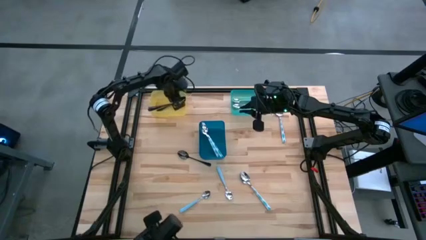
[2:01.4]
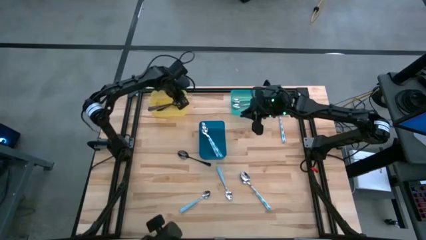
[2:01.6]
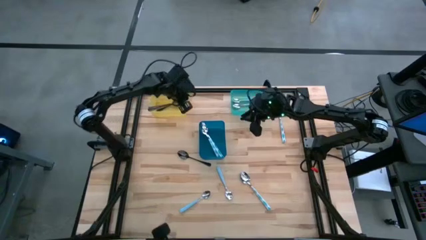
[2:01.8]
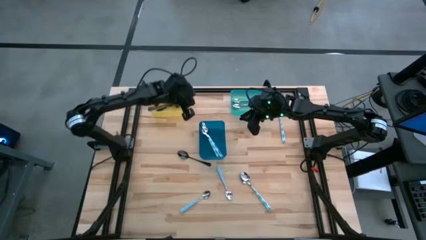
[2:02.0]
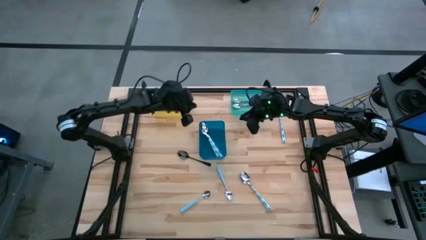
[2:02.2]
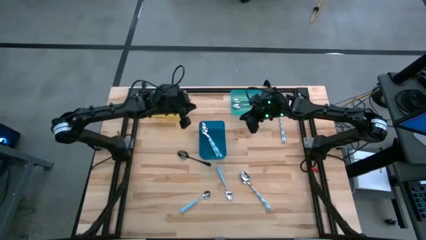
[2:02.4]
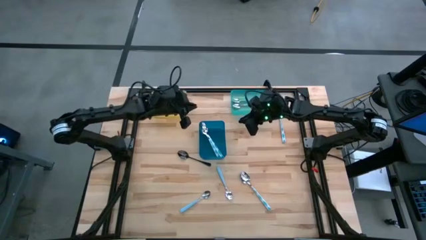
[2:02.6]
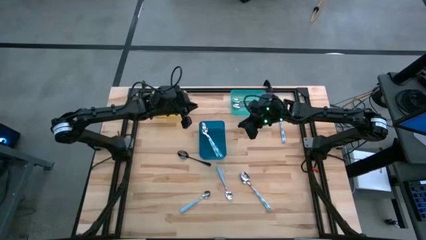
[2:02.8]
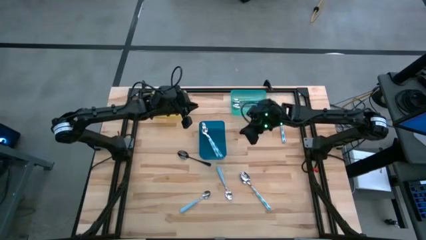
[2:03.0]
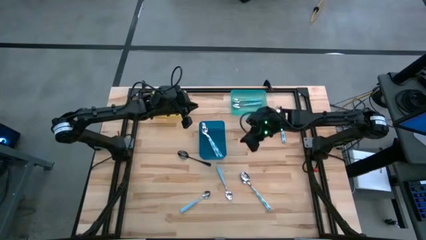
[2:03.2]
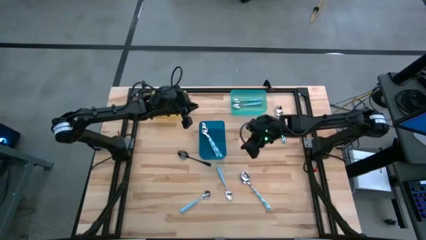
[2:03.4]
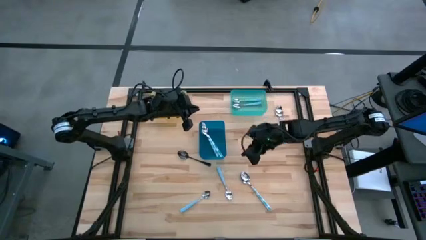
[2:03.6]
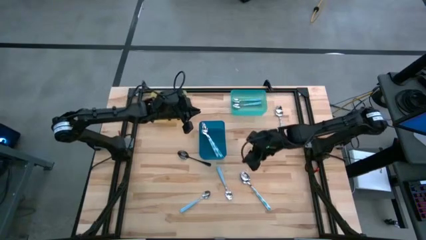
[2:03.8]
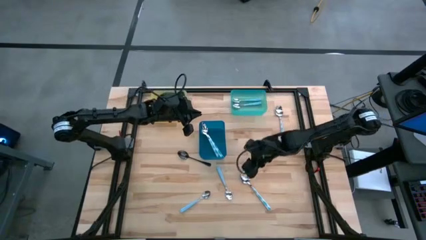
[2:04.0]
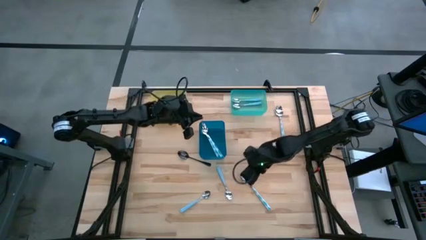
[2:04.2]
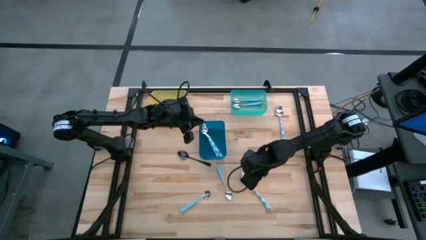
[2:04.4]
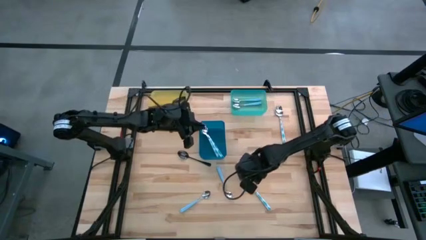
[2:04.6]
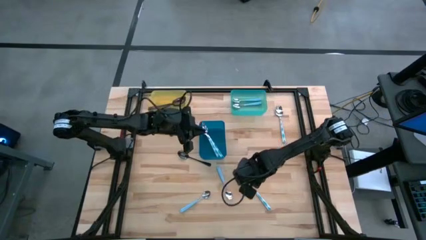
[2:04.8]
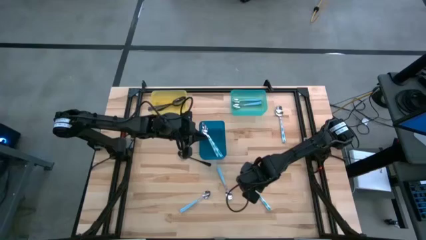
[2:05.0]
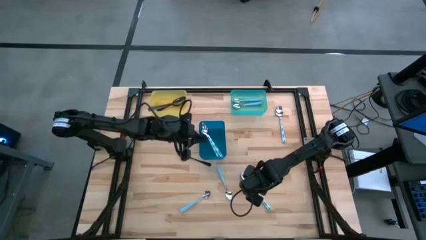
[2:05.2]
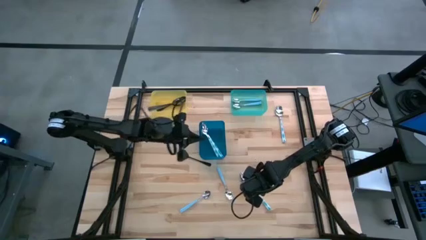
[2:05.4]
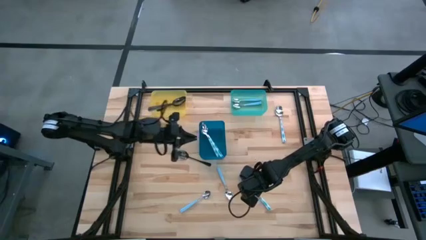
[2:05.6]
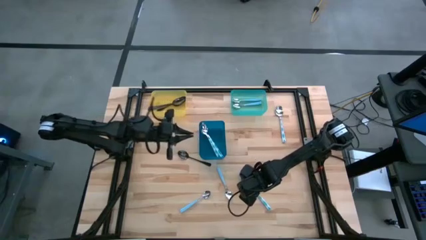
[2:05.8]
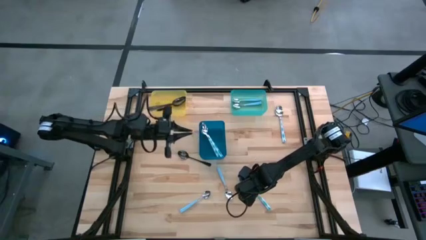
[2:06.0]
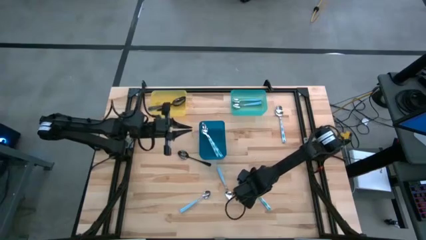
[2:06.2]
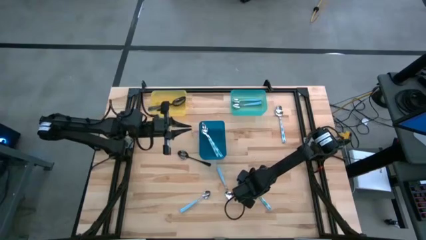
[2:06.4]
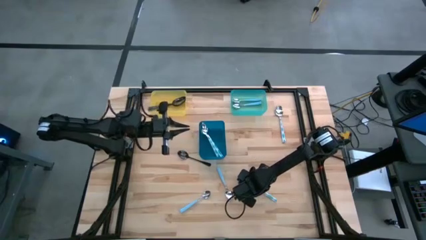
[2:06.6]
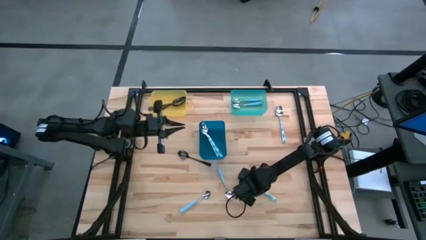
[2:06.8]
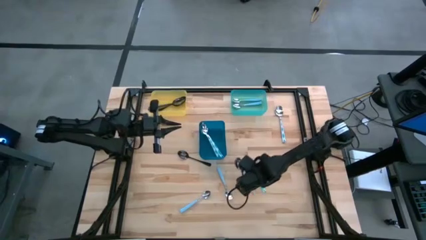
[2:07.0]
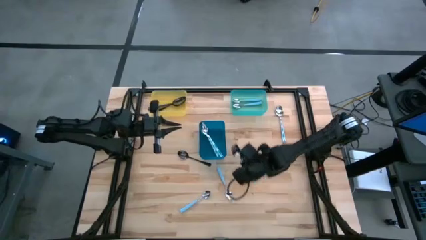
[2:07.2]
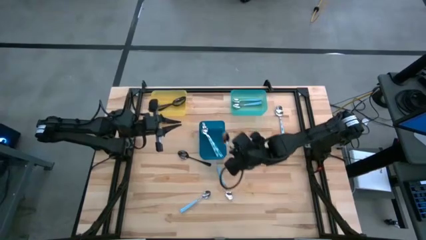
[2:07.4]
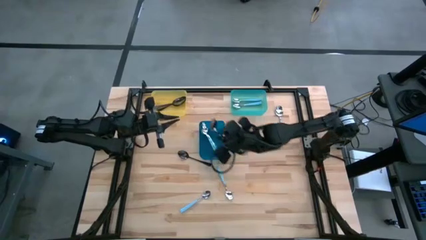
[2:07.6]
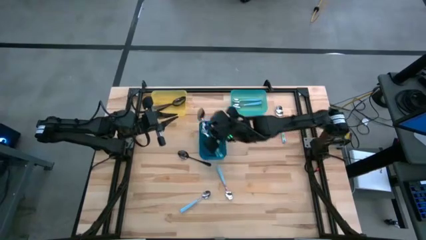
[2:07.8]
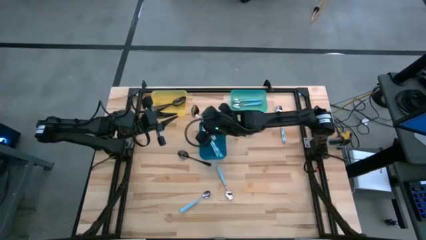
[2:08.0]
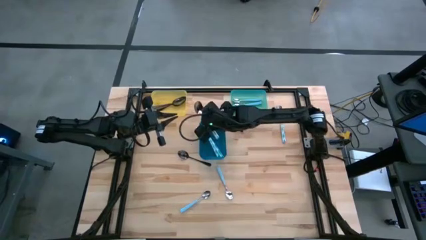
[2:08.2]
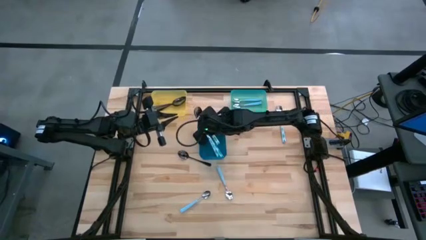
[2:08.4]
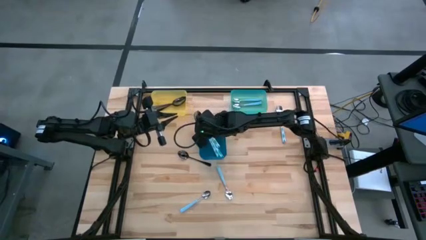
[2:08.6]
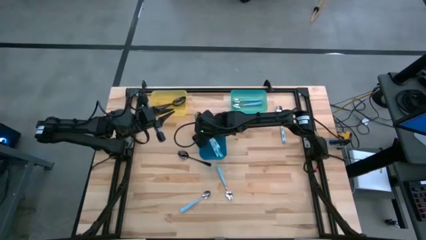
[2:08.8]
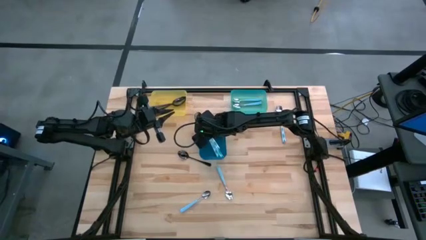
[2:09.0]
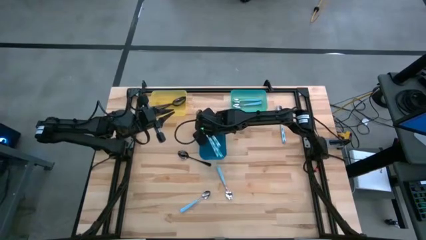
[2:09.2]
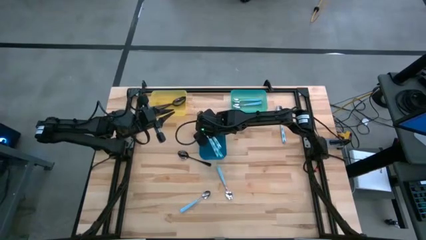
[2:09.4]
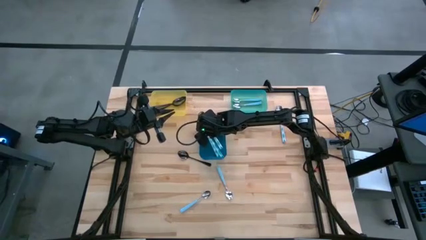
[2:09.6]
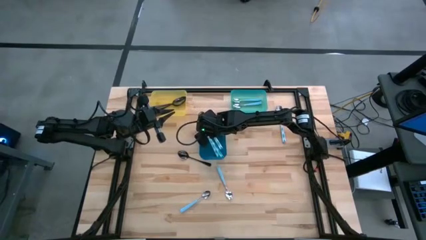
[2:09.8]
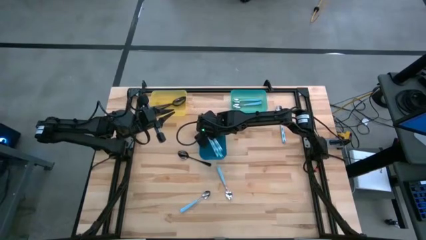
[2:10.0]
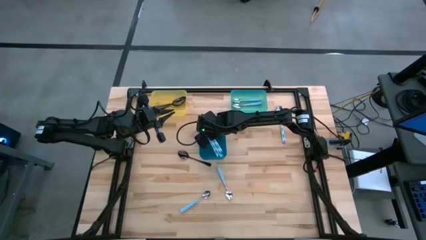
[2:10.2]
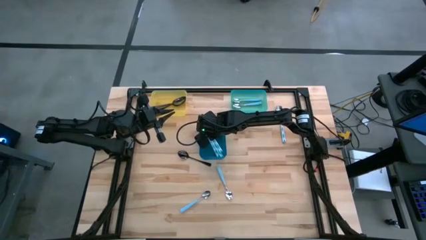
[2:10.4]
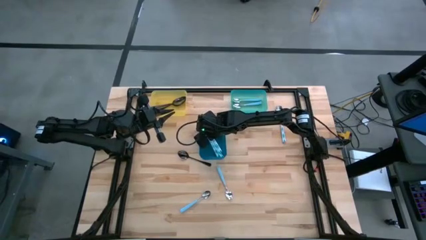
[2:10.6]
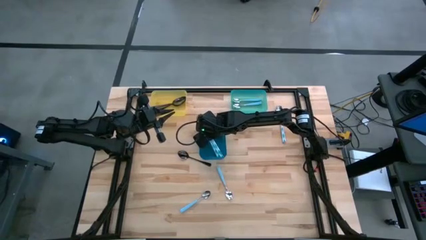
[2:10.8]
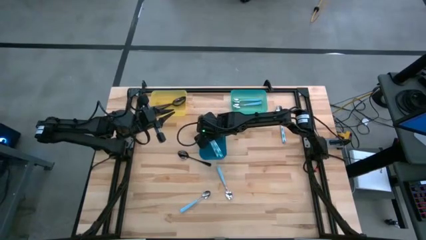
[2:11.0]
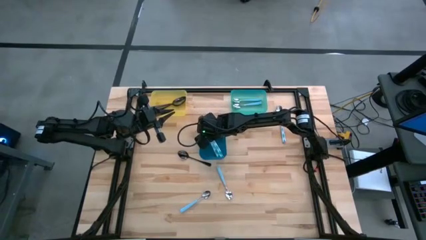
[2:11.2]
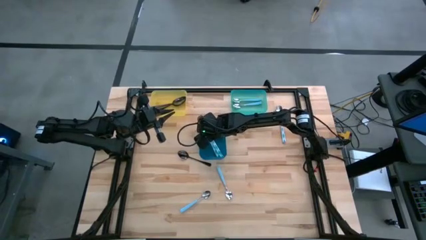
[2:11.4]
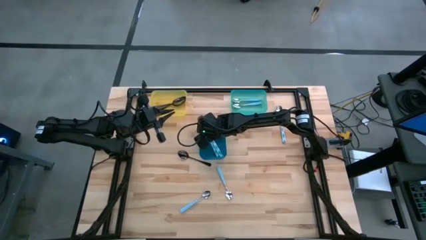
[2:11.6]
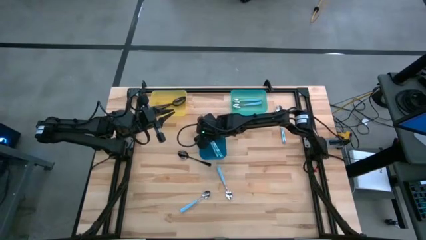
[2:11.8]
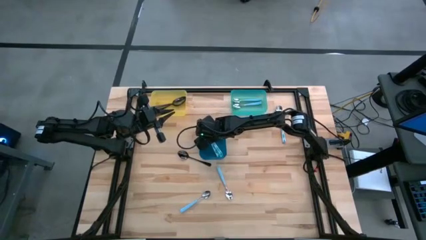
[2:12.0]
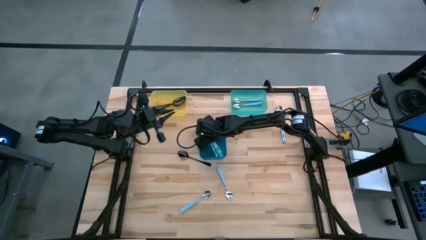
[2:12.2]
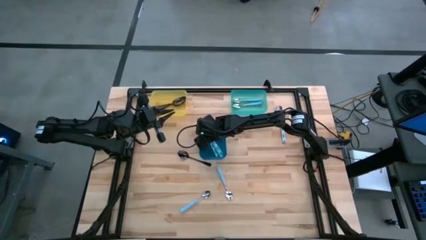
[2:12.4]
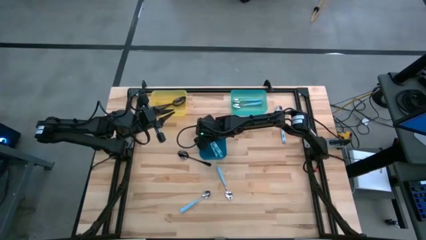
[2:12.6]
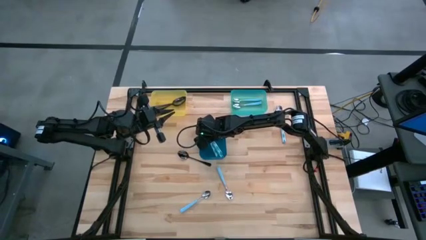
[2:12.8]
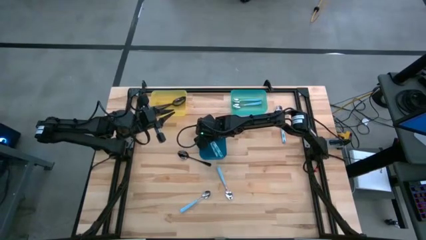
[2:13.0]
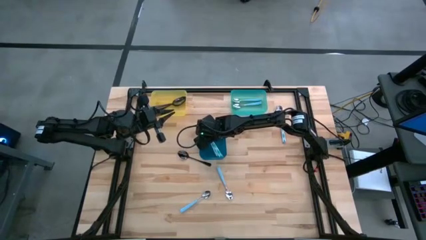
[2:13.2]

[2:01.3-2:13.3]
Task: Sort silverware by color (type)
Put the white patterned spoon into the blue bin

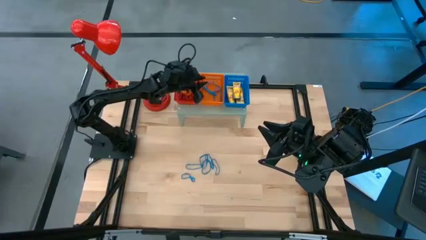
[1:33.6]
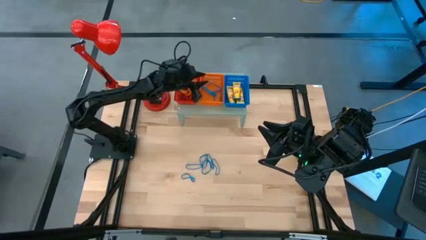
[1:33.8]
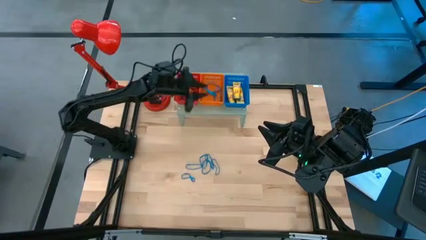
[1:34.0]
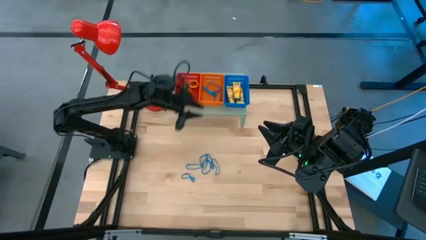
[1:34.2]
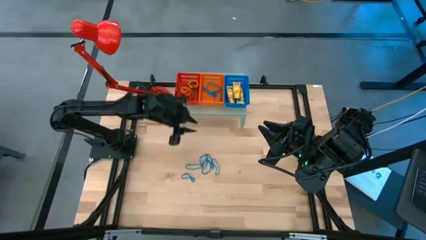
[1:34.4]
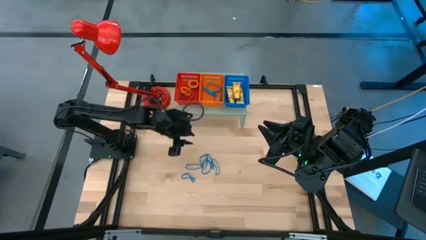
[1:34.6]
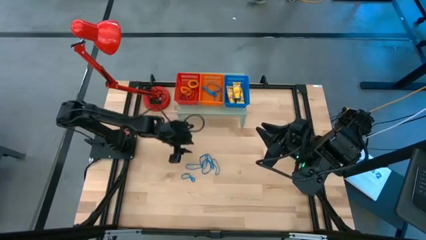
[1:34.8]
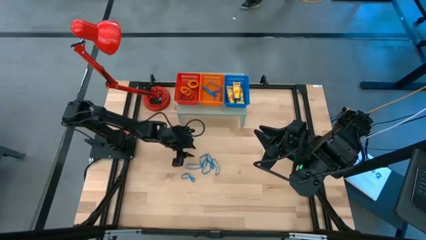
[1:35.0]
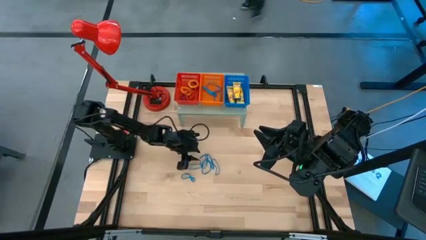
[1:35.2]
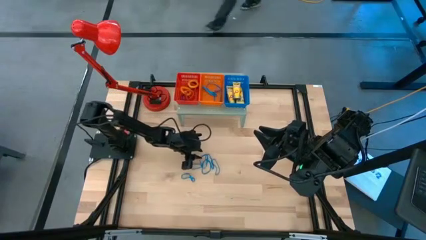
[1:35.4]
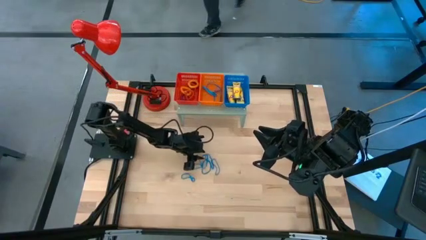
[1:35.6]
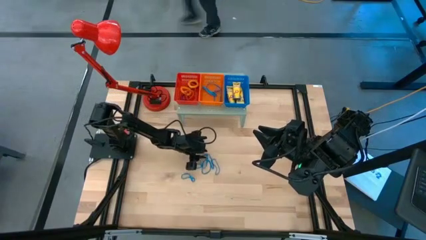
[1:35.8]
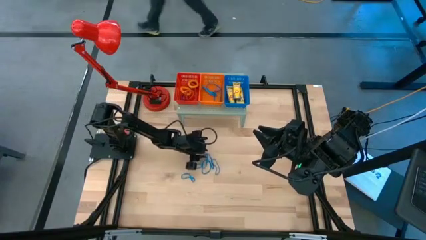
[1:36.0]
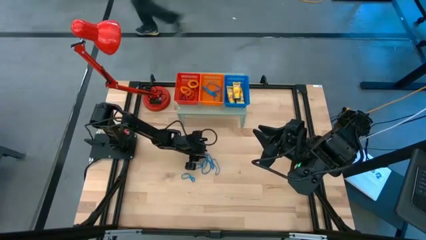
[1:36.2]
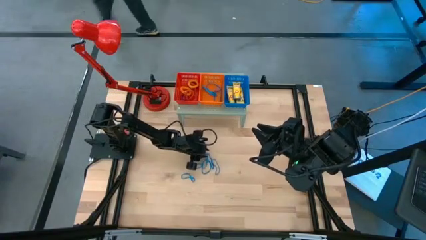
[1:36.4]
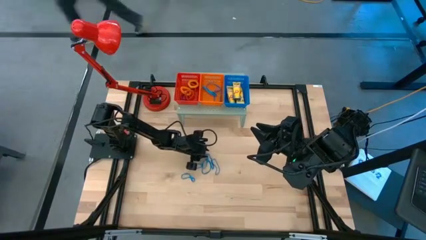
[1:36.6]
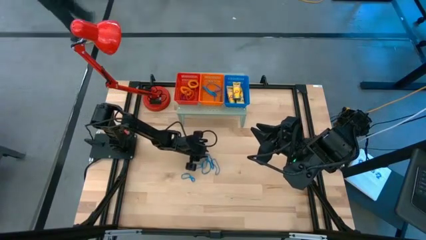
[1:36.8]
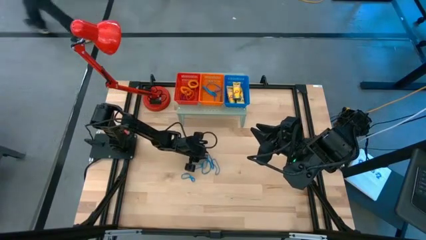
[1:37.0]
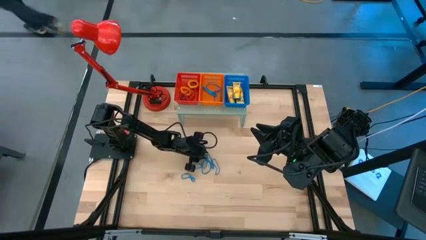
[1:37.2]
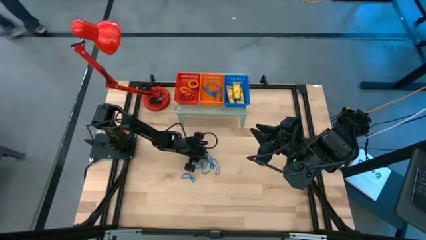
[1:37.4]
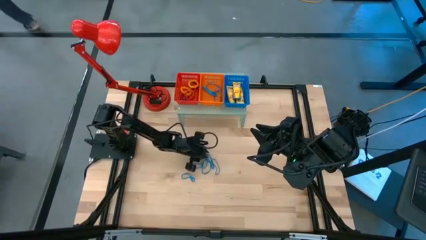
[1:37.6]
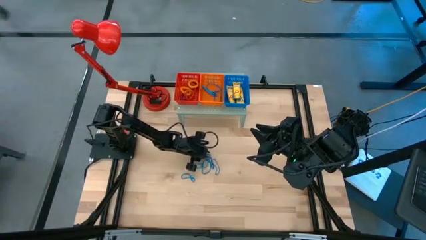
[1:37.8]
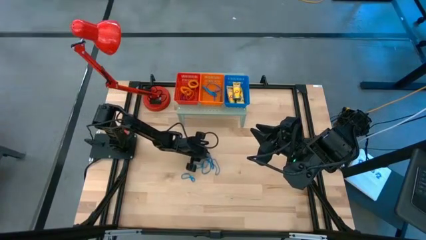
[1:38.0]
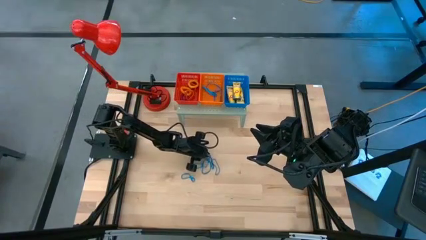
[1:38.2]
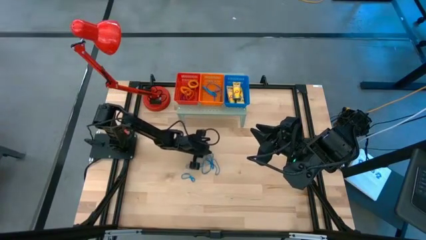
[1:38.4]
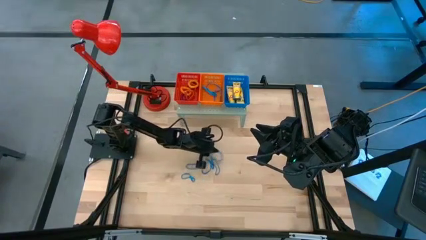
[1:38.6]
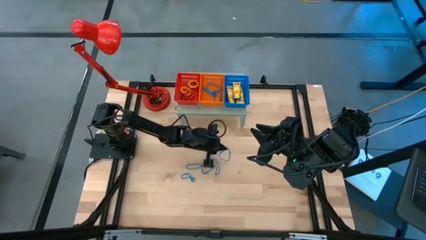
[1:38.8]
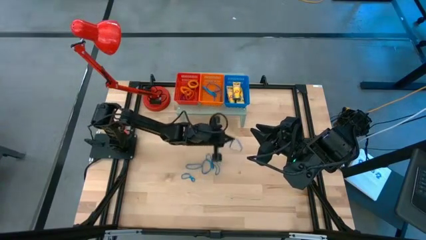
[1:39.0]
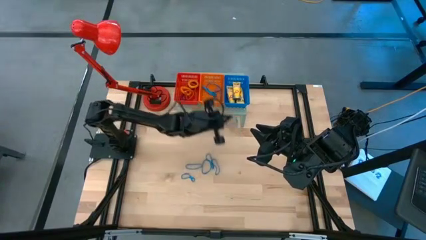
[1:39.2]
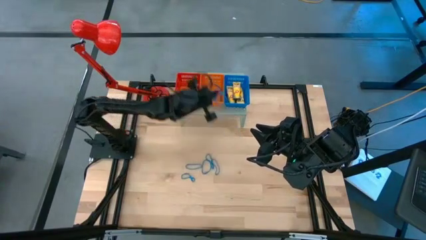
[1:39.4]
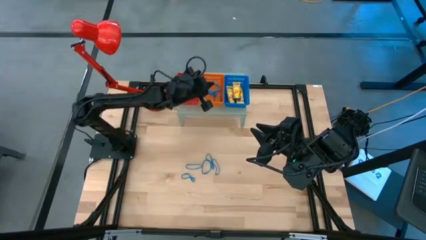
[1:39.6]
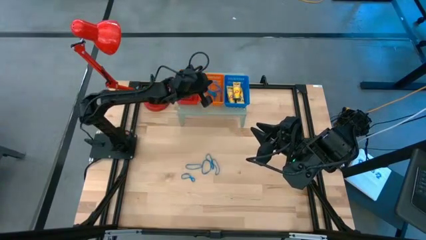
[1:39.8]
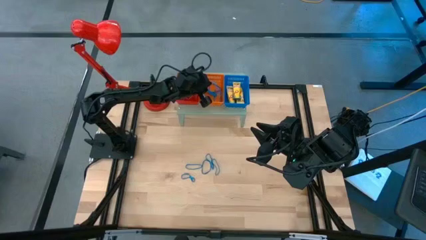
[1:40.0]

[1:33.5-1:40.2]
Task: Pick & Place Office Desk Supplies
Put the blue rubber band into the orange bin on the shelf
